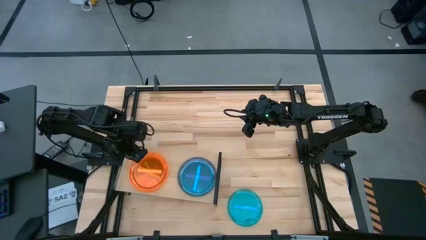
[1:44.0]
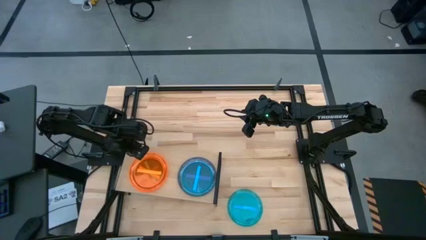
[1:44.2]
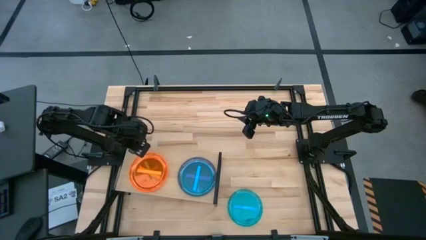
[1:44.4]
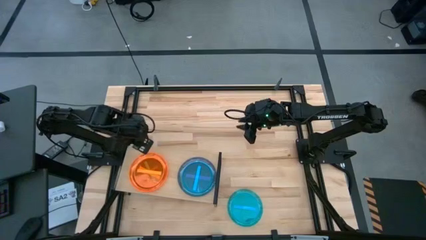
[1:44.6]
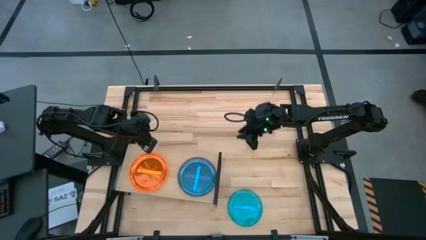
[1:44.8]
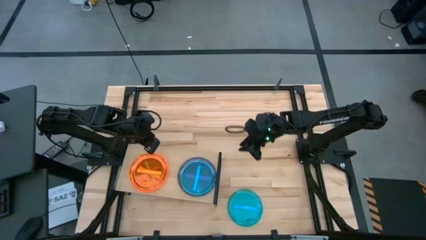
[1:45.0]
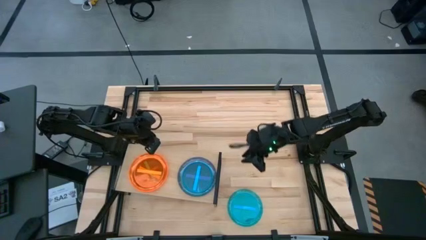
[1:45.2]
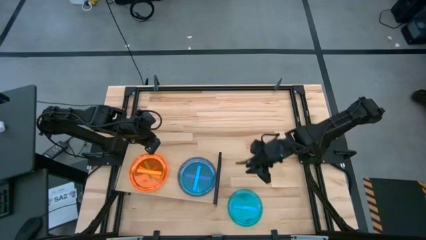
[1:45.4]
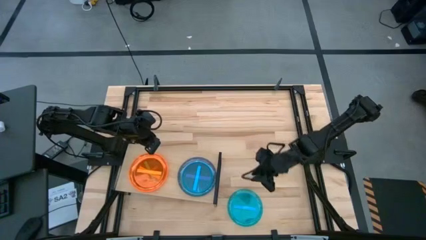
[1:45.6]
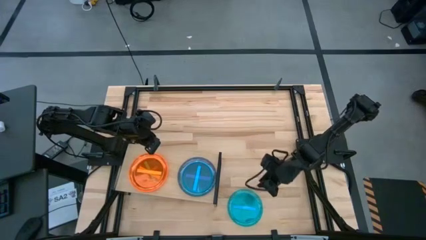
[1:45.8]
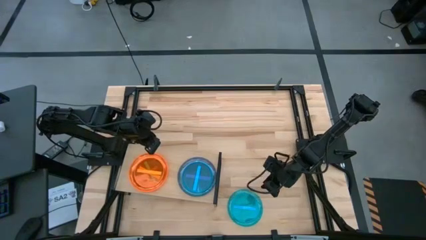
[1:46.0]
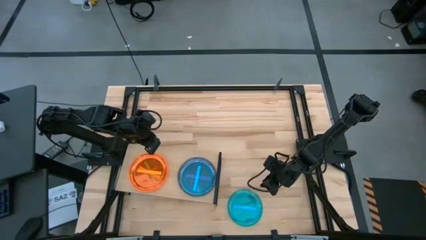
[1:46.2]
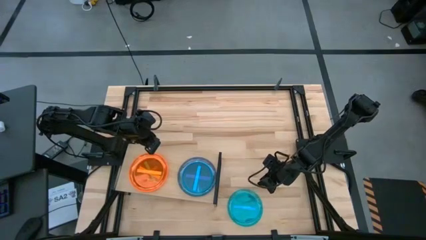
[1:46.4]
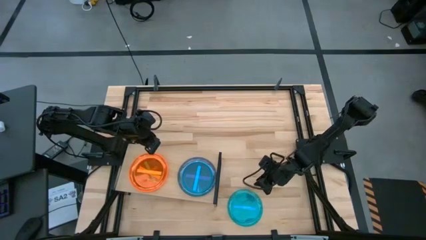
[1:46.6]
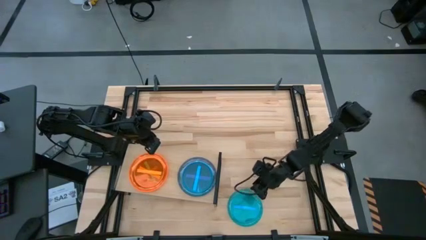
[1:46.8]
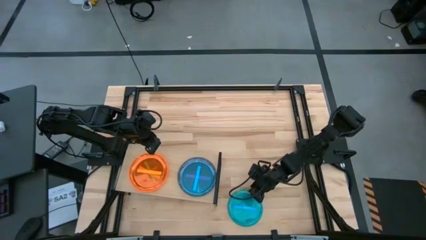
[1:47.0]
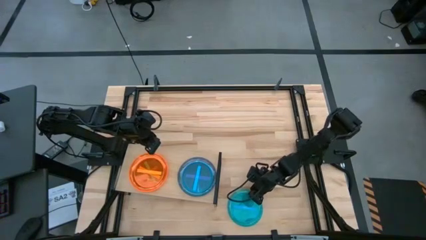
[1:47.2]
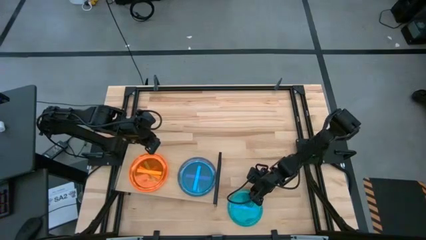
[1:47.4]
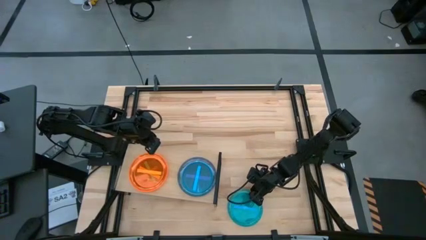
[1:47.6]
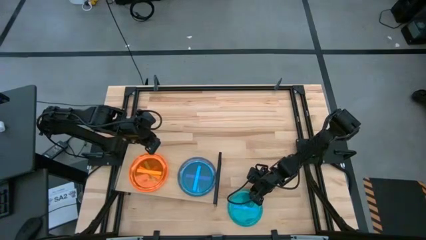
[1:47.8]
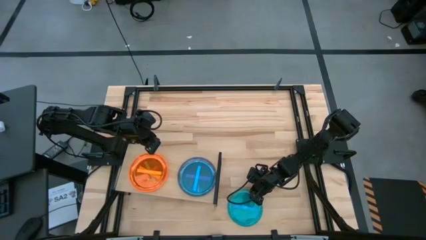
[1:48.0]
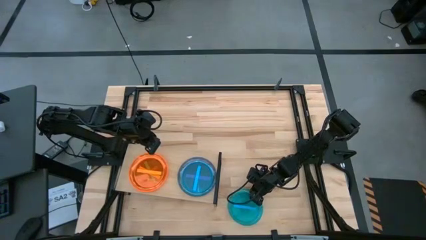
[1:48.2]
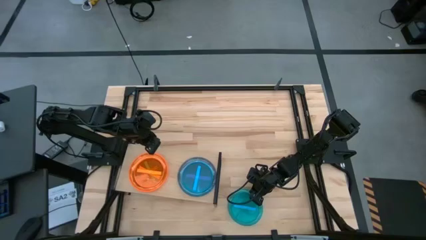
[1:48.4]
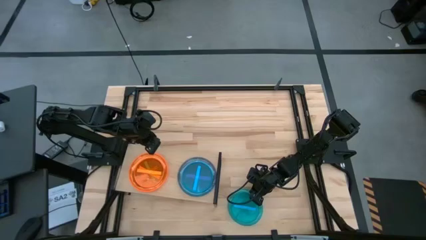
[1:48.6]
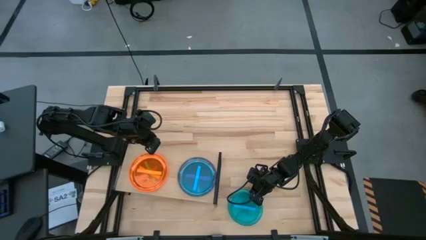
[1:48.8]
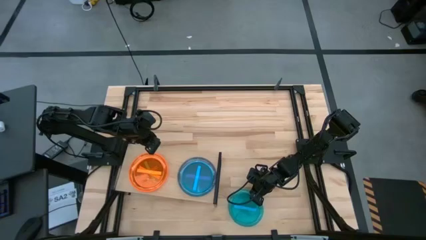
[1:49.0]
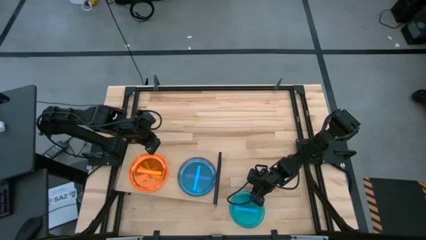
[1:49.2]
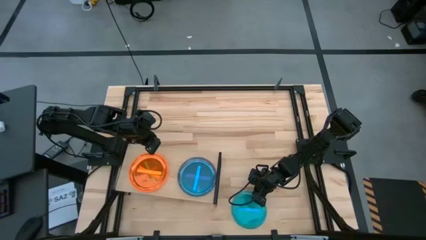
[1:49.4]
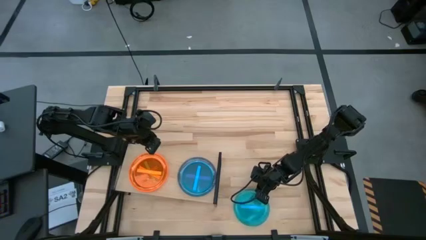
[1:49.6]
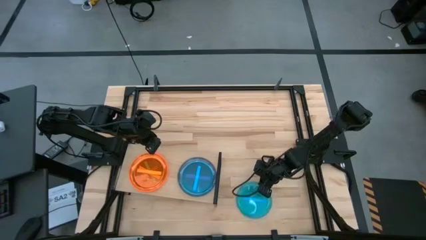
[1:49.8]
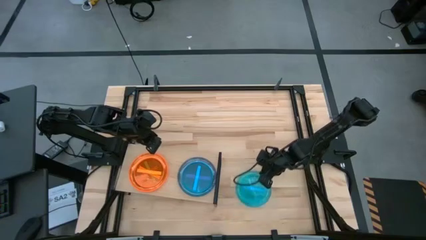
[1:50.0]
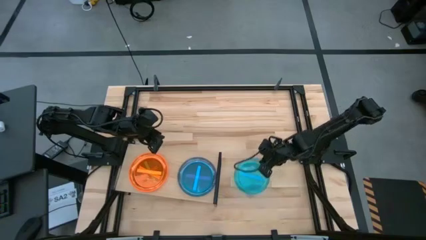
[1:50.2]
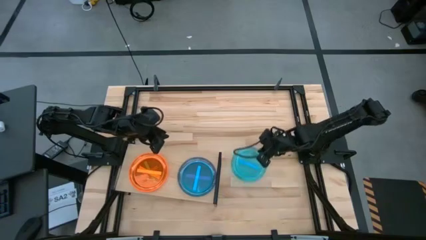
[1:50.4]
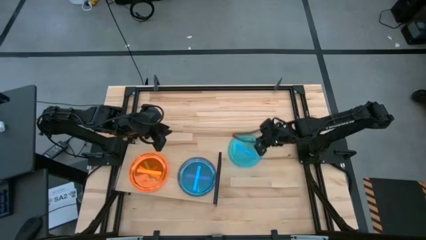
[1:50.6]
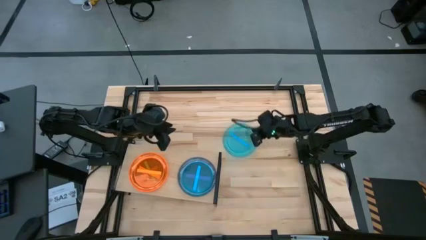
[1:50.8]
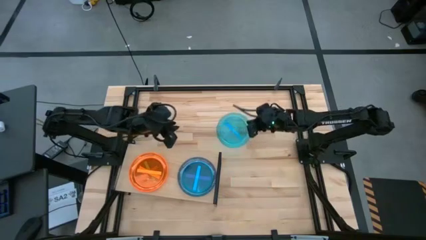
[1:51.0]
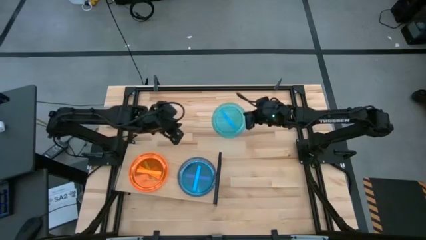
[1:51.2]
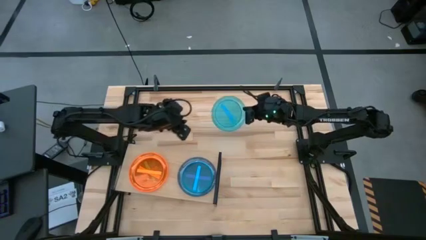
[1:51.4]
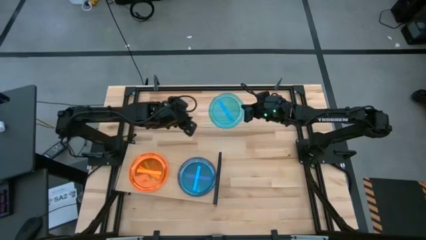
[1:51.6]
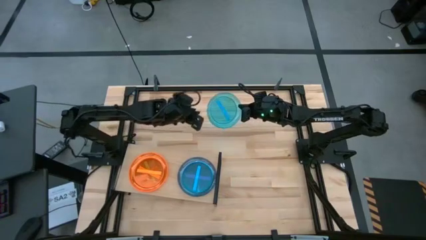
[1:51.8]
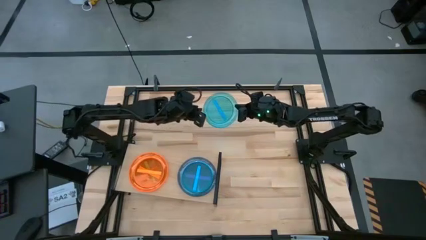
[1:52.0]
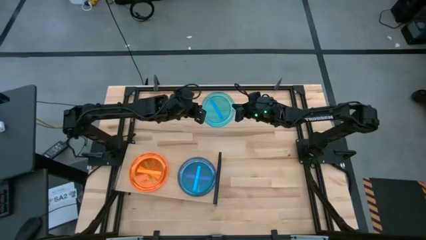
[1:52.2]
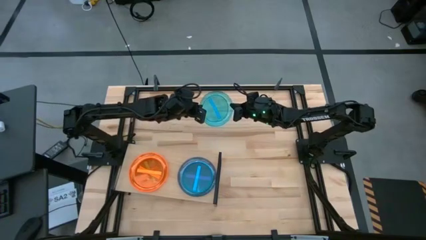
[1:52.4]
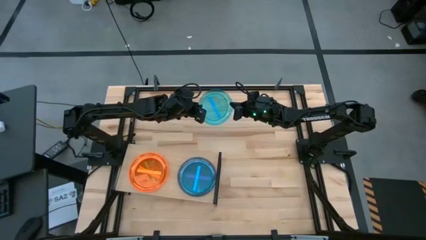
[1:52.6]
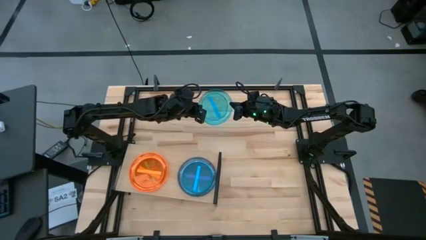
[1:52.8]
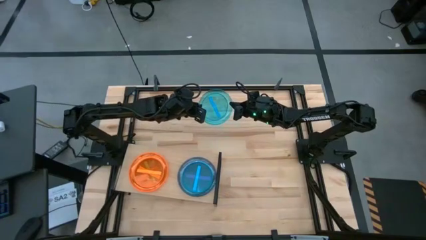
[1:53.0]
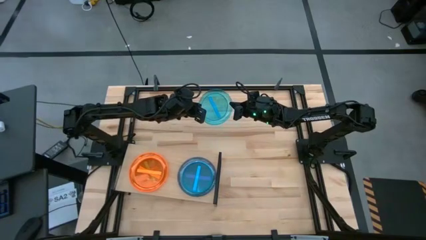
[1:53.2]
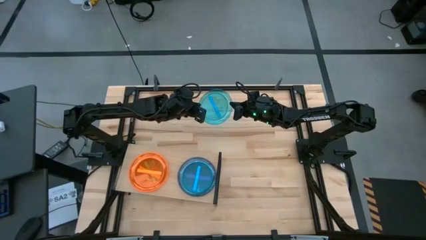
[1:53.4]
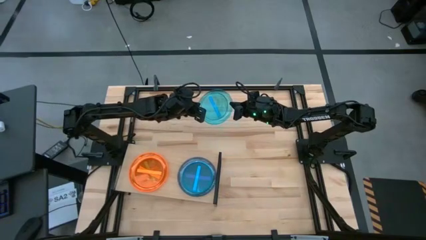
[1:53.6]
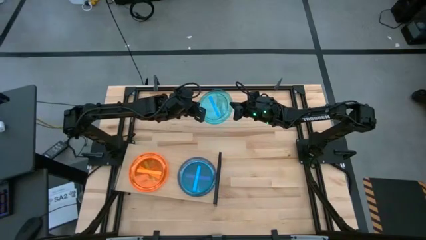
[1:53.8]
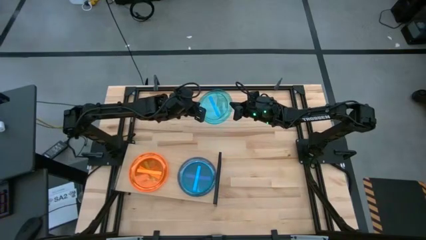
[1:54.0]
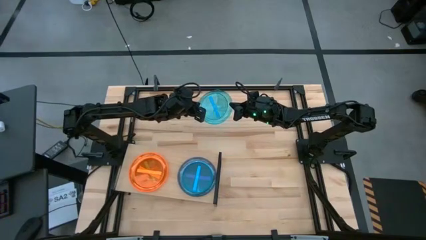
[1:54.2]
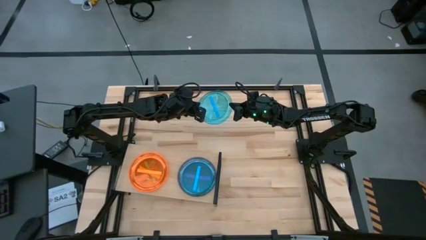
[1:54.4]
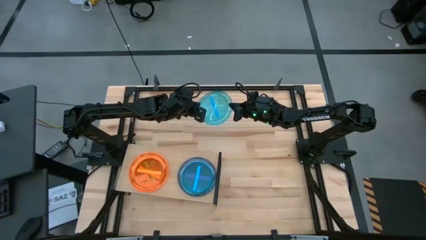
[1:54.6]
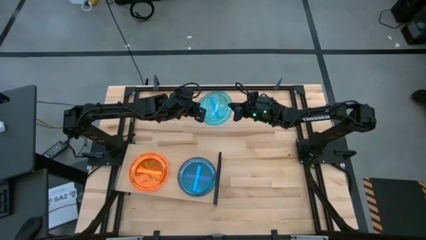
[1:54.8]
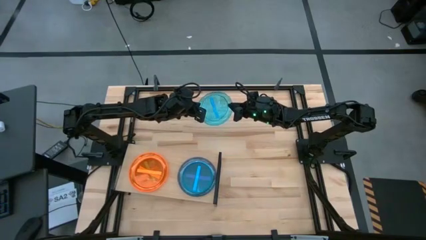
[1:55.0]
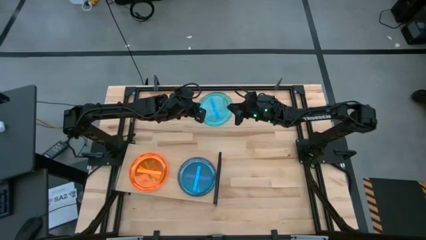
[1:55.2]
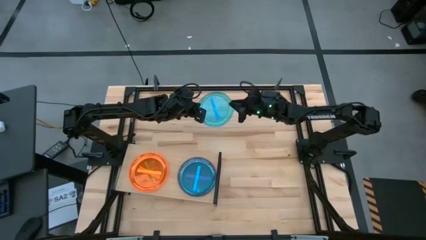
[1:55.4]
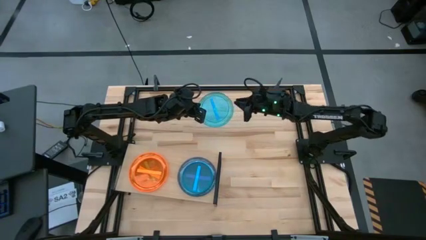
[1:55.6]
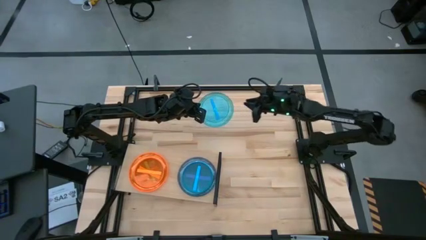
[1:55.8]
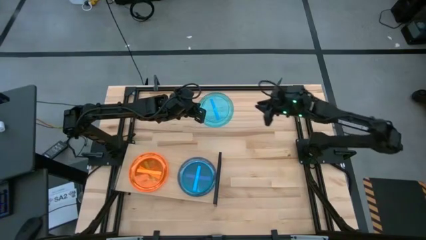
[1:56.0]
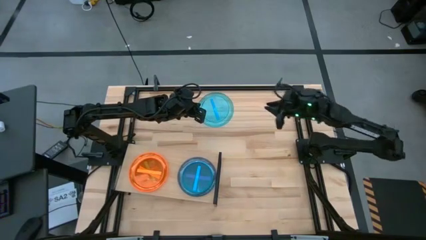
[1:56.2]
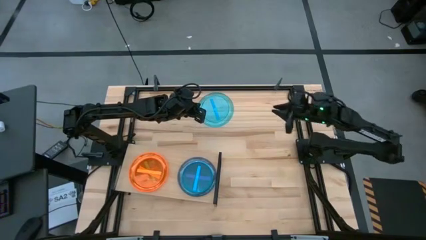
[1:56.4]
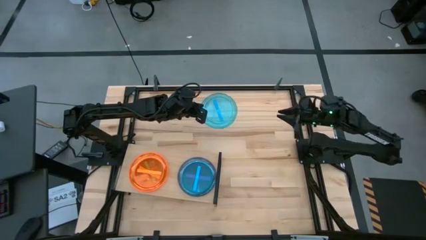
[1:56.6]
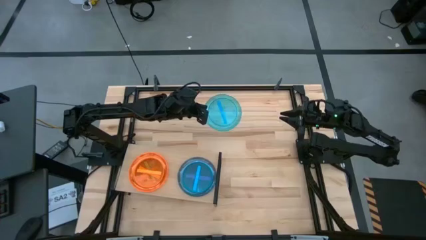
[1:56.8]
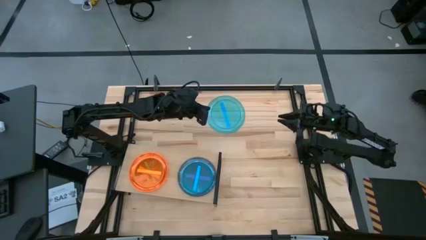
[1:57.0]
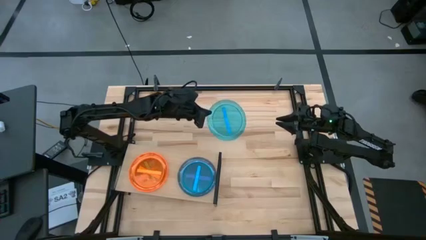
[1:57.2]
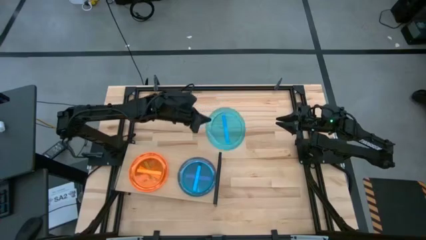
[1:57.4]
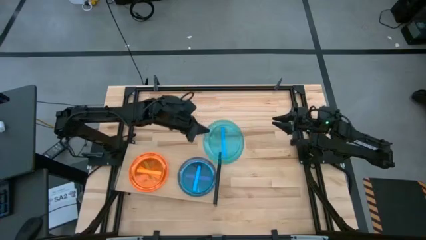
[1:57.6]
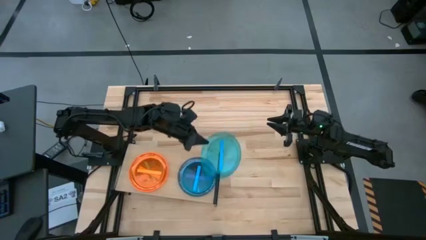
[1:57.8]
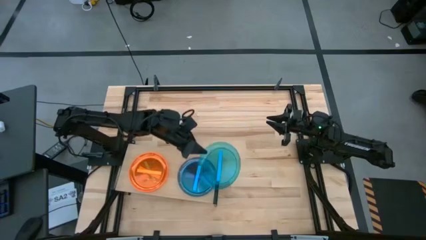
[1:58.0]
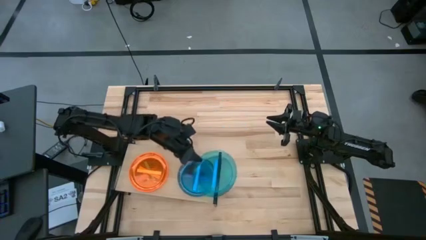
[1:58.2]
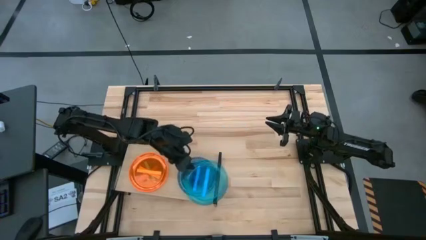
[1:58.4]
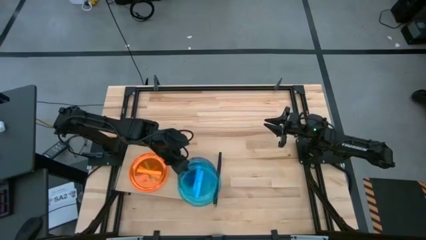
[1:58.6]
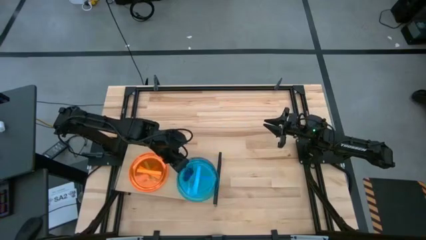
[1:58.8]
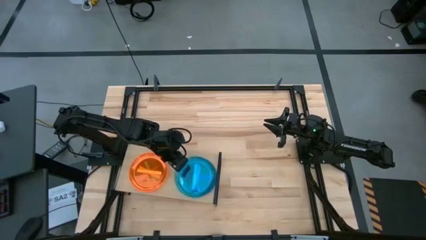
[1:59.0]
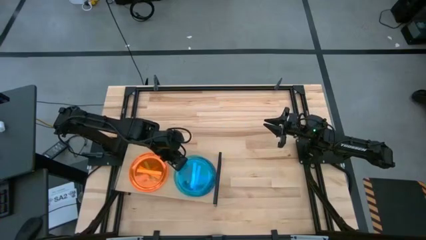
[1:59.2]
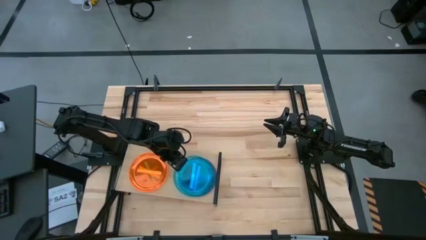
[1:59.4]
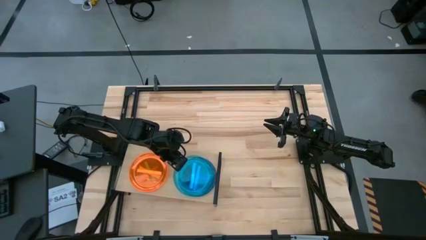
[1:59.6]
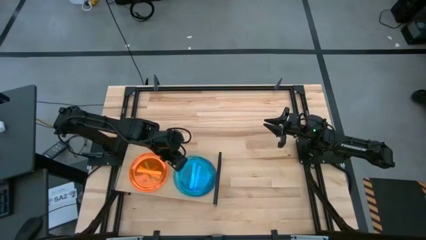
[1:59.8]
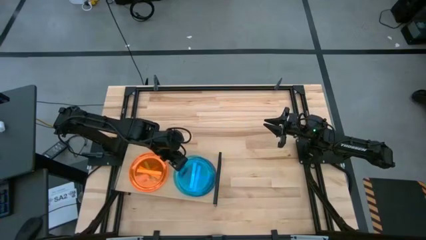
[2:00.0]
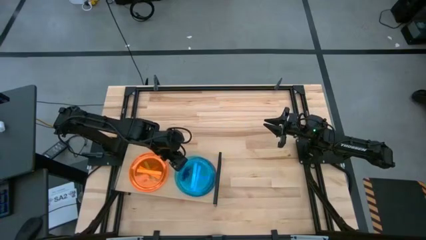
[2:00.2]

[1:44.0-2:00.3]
Task: Place and stack plates onto a shelf
Stack the blue plate on top of the other blue plate on the shelf
